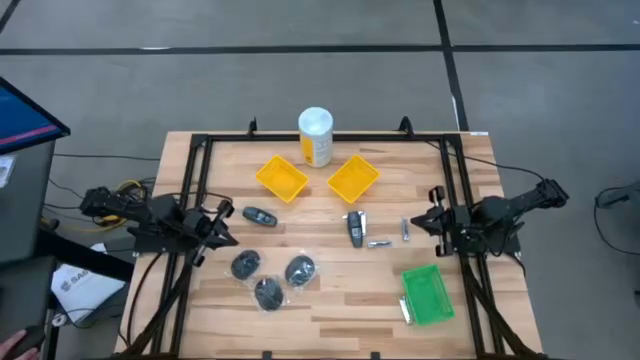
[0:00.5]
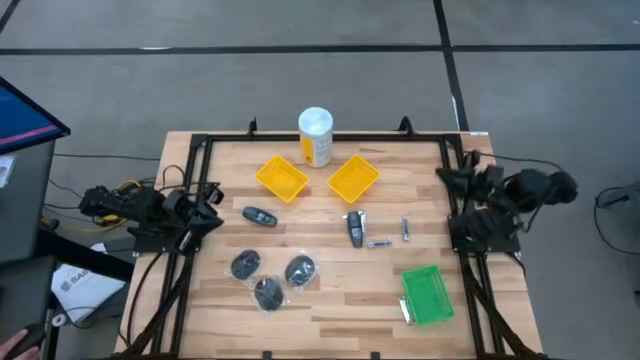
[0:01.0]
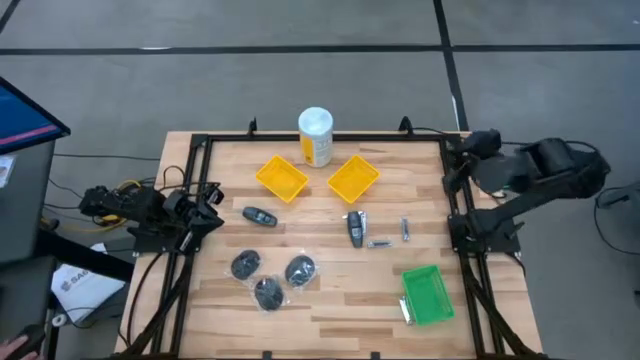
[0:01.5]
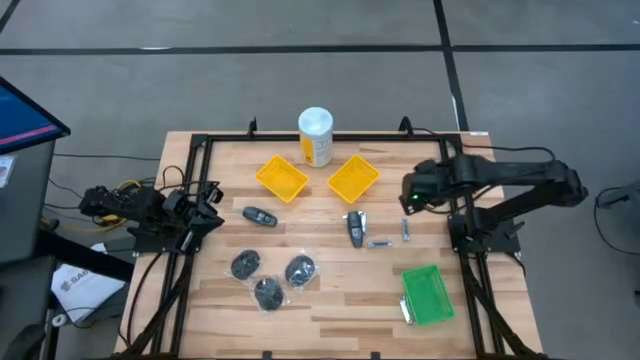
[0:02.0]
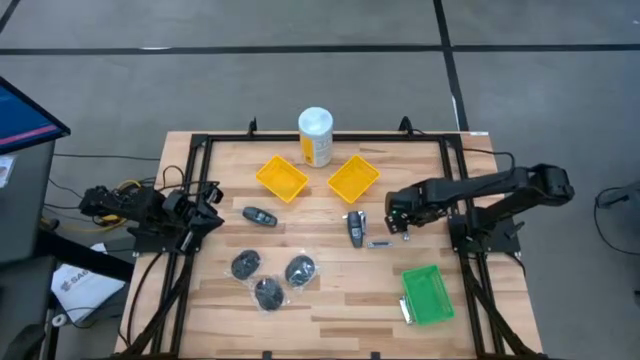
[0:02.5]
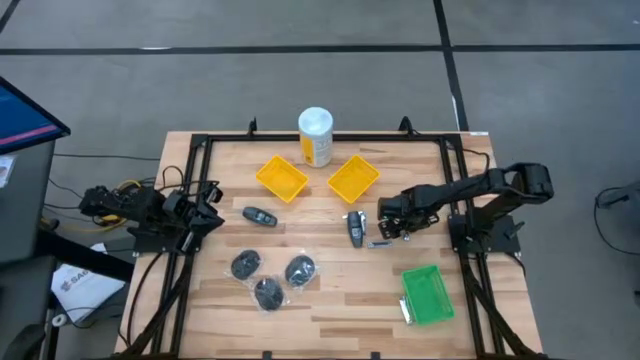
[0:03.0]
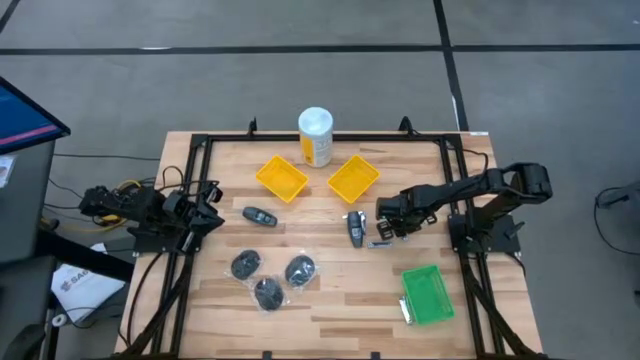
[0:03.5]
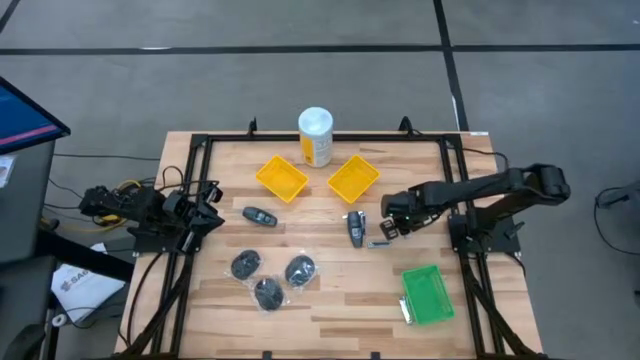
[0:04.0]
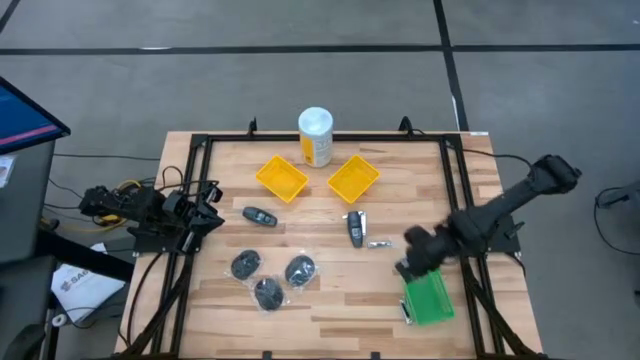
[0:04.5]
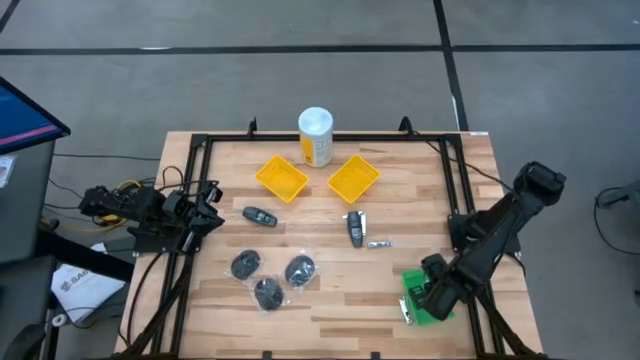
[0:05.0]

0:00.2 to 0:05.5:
Task: Pick & Place Travel size toiletries
Put the nail cutter into the green bin

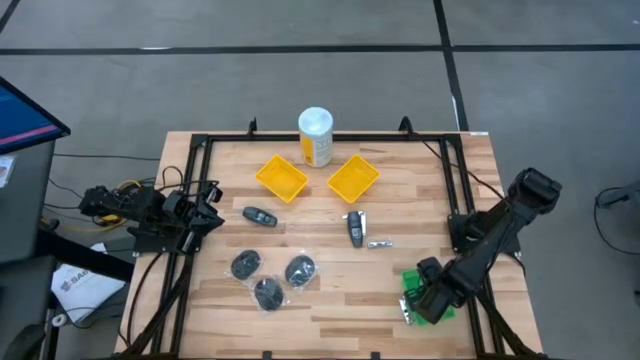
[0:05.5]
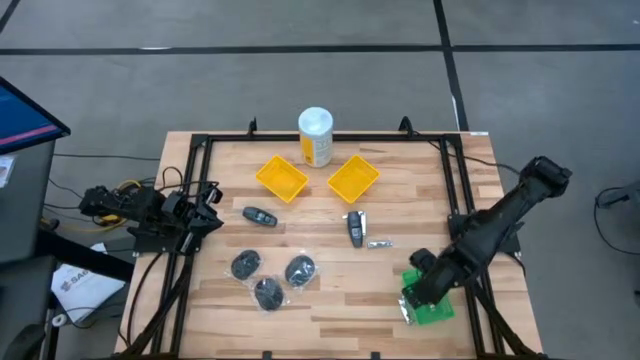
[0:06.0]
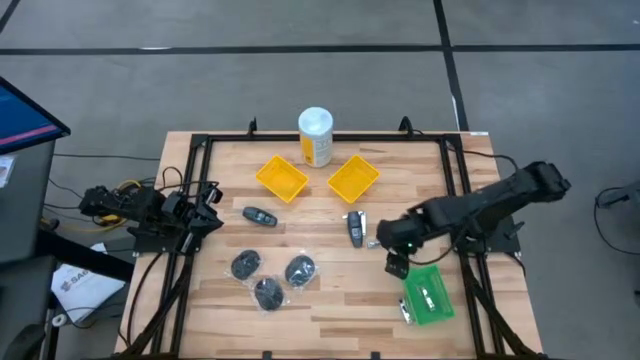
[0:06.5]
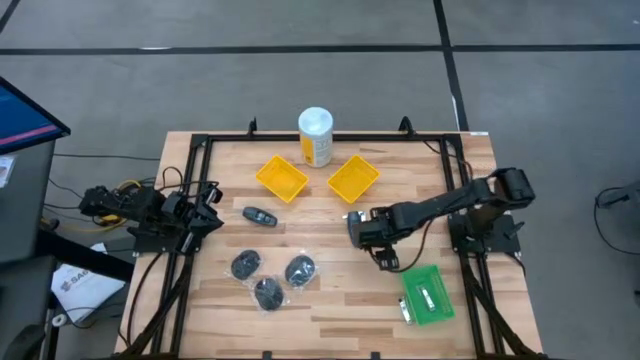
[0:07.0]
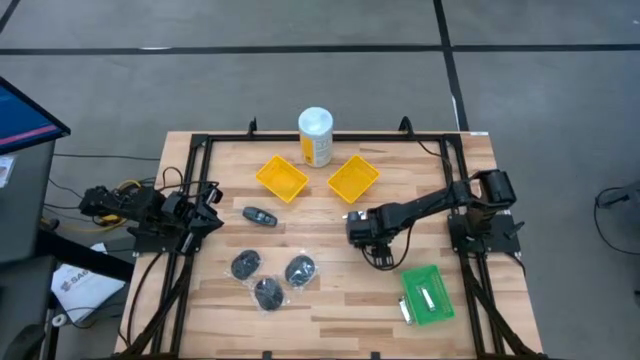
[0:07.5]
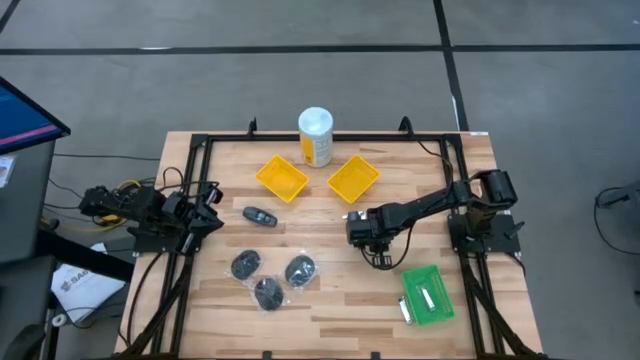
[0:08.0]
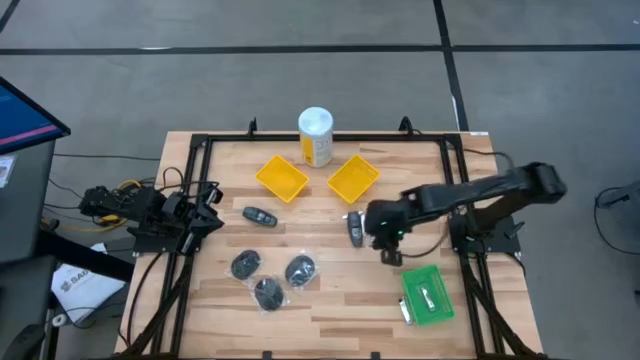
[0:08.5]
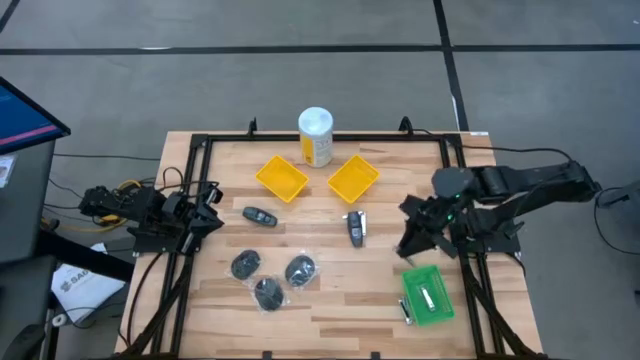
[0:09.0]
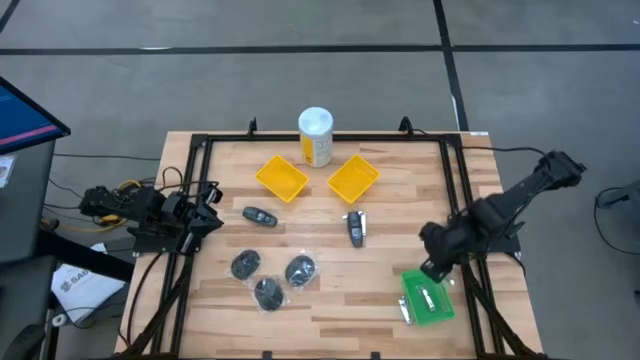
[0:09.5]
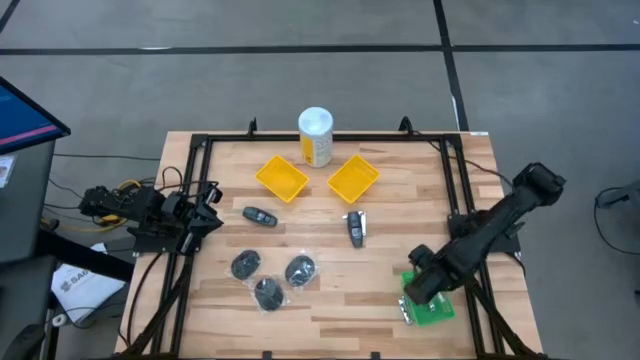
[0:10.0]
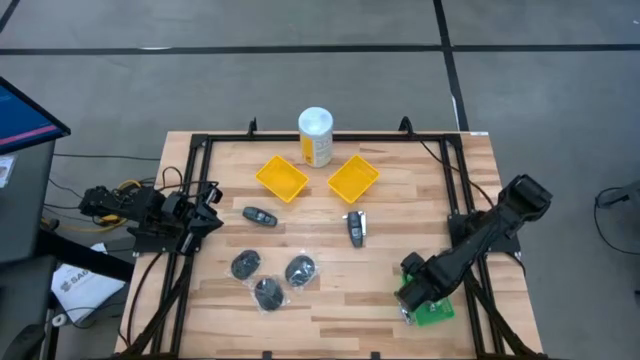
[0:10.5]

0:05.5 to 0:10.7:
Put the nail cutter into the green bin

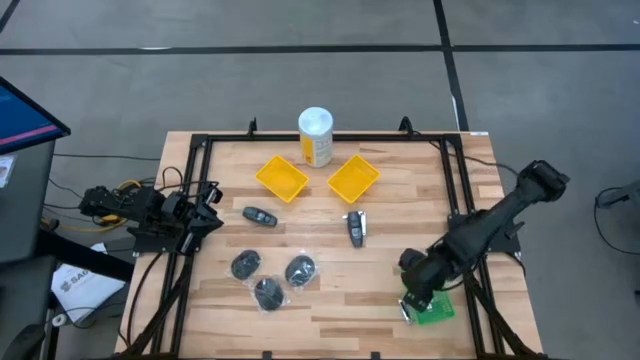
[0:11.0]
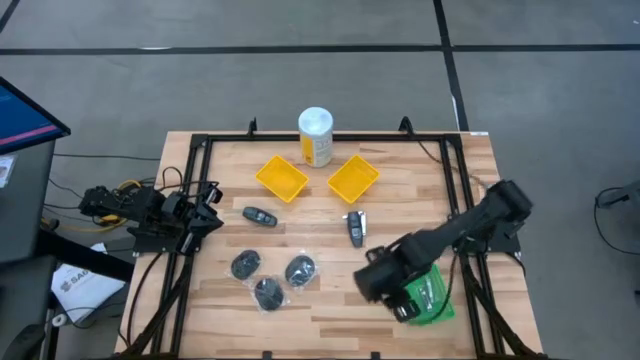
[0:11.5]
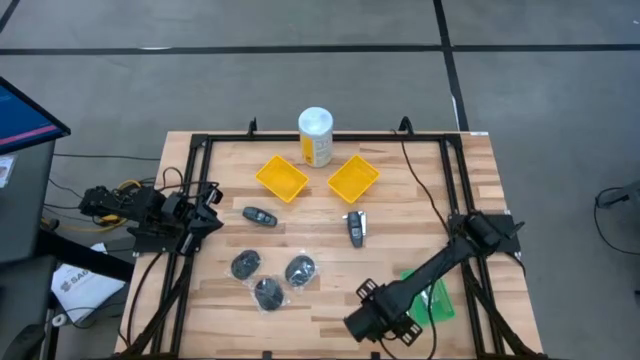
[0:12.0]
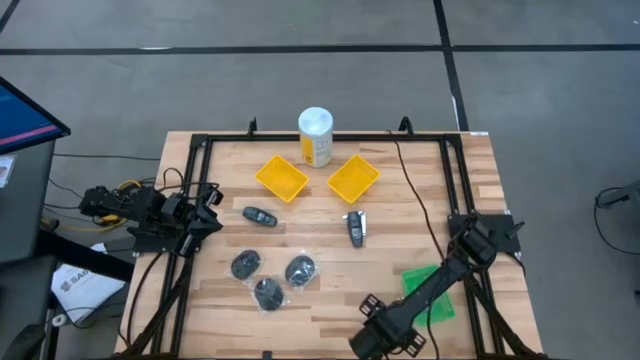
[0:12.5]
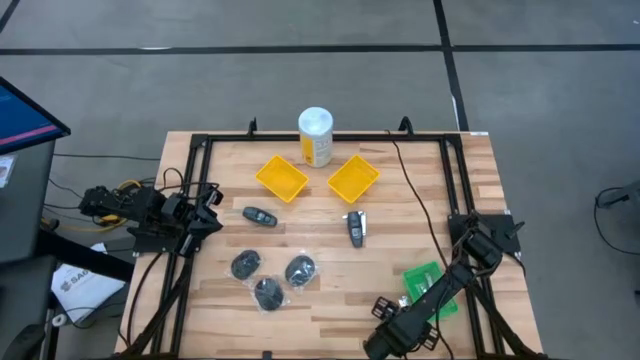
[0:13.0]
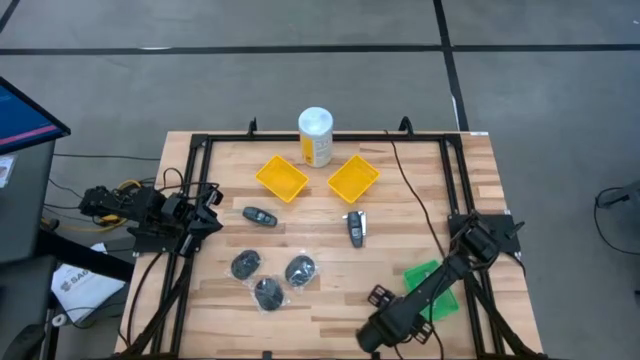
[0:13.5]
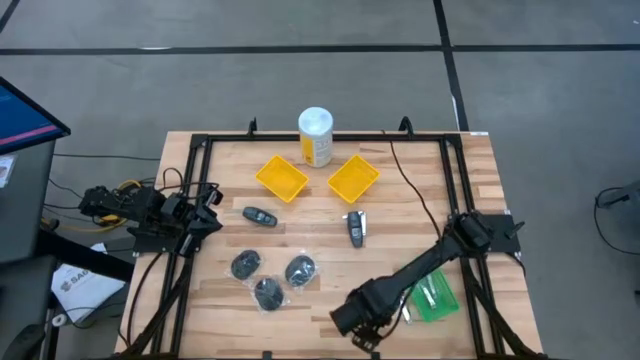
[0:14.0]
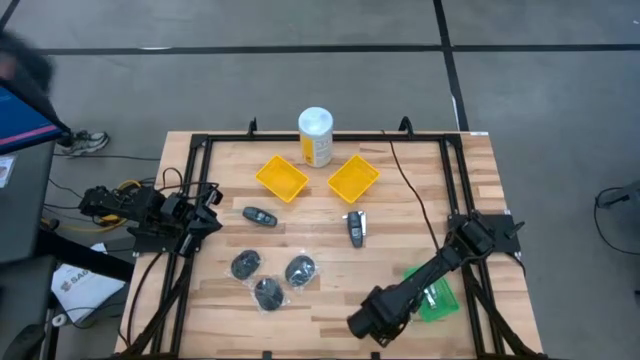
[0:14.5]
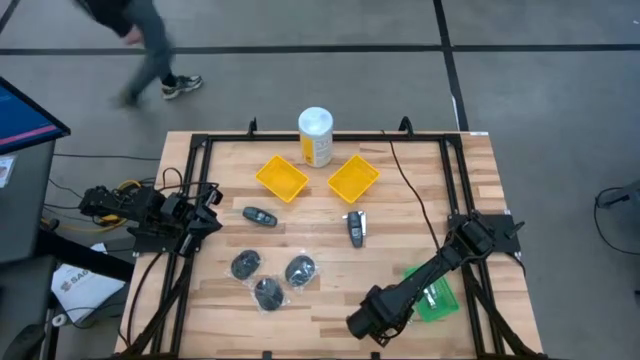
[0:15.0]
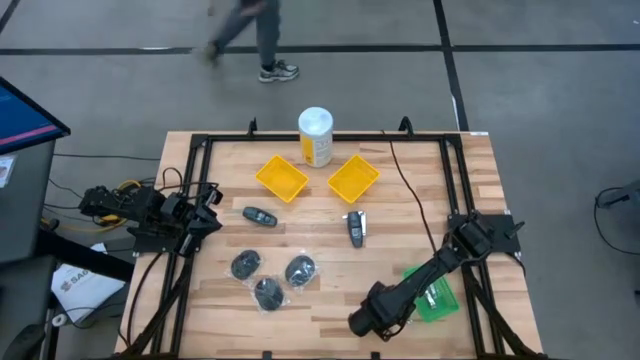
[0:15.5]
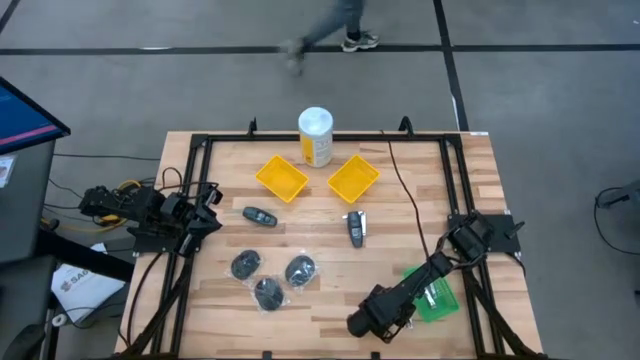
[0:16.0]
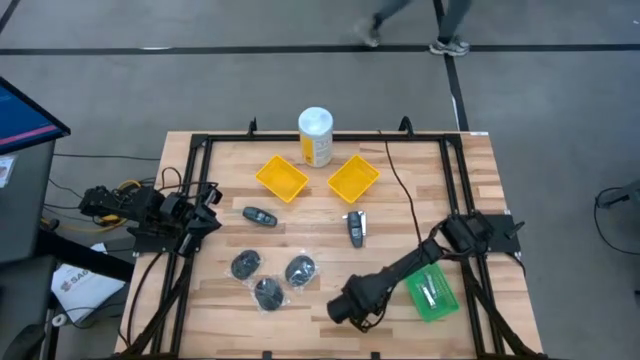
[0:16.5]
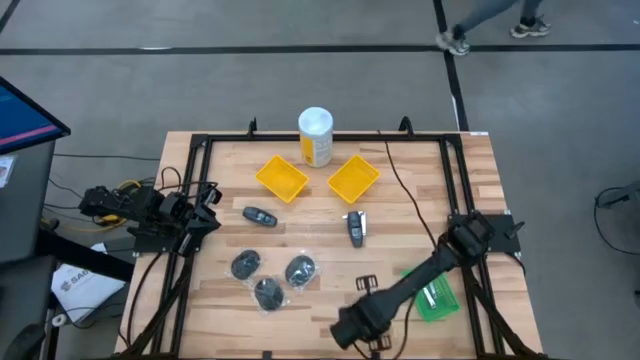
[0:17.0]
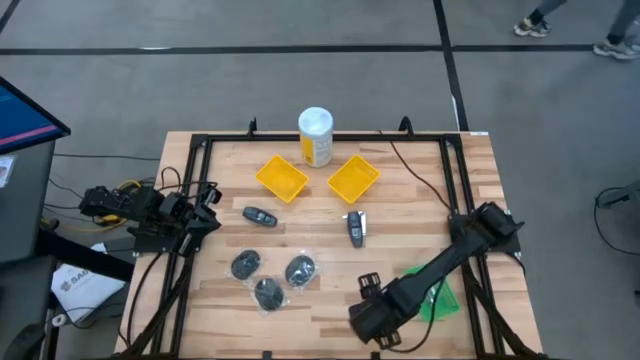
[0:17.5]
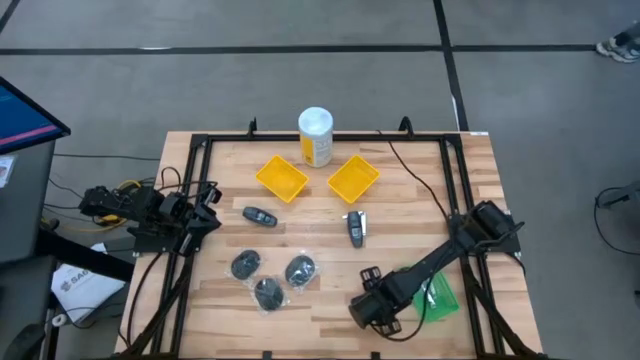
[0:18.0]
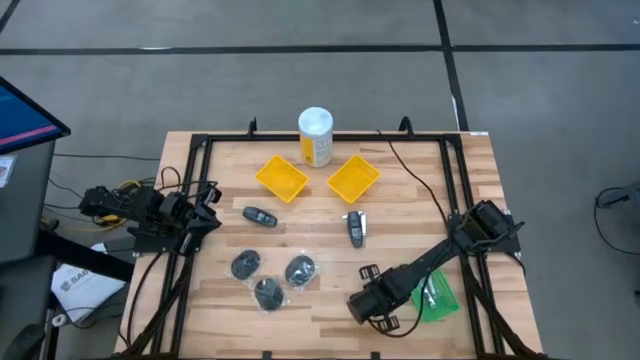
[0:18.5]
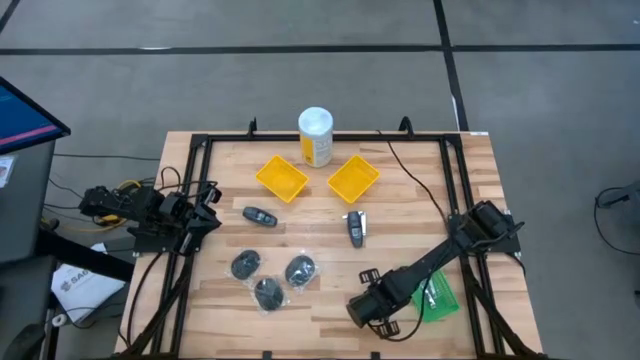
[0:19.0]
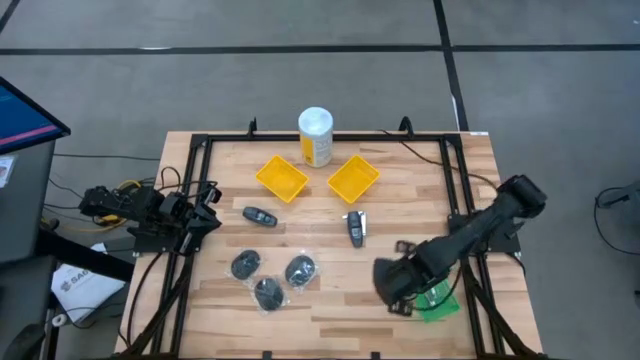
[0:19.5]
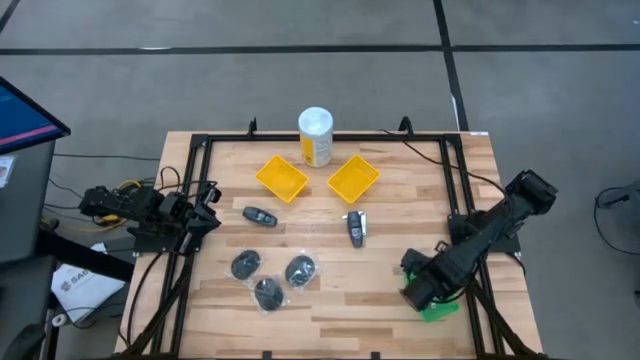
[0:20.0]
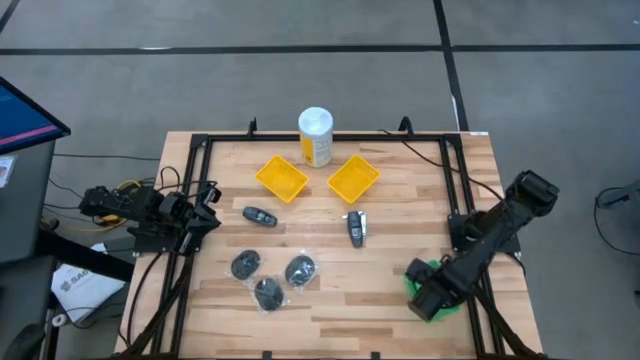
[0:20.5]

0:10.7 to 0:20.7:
Put the nail cutter into the green bin

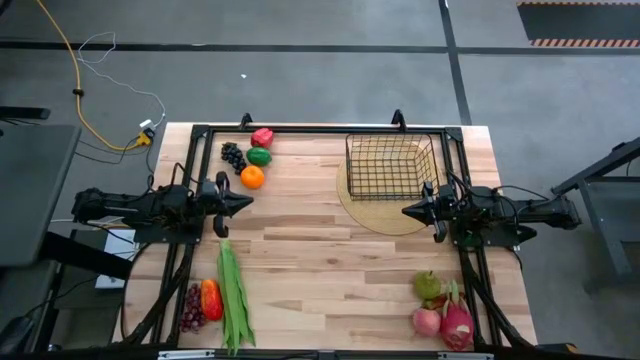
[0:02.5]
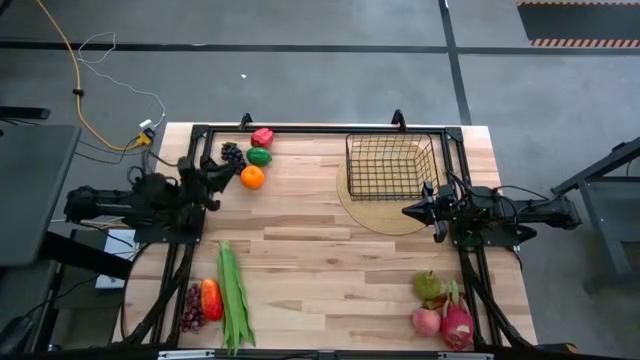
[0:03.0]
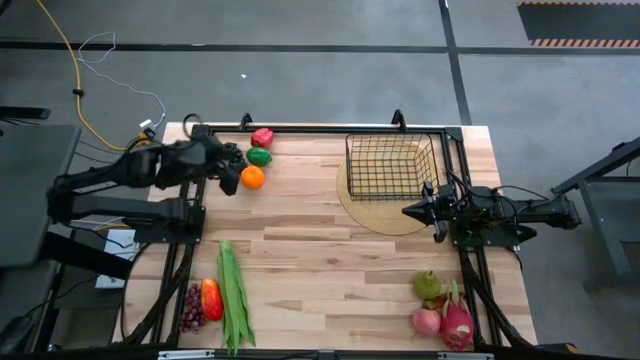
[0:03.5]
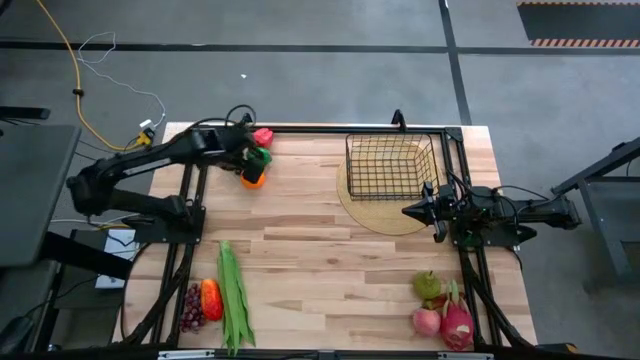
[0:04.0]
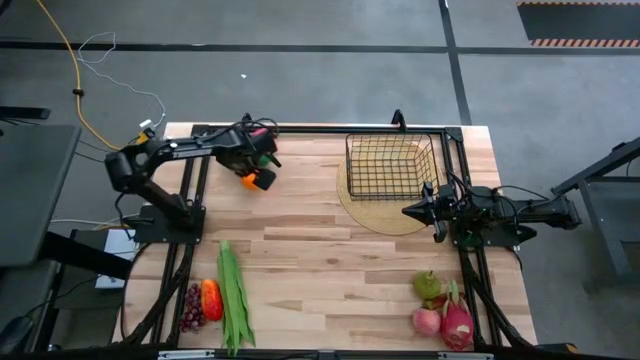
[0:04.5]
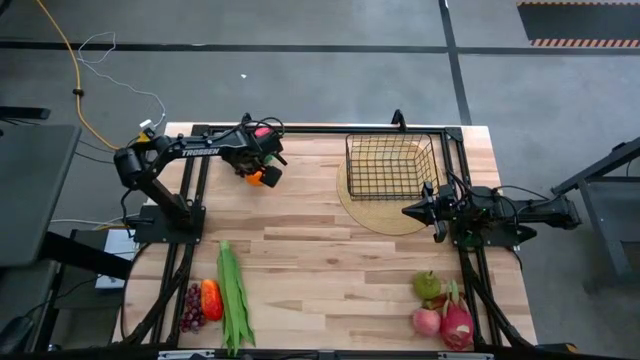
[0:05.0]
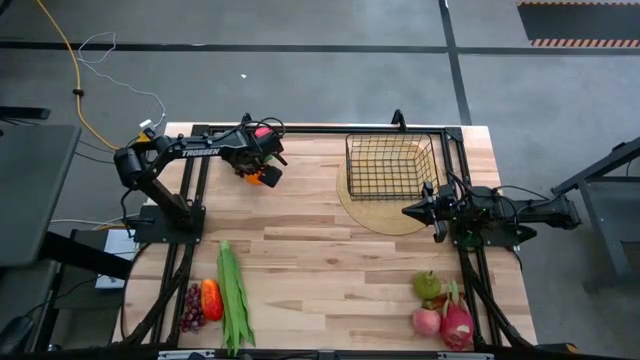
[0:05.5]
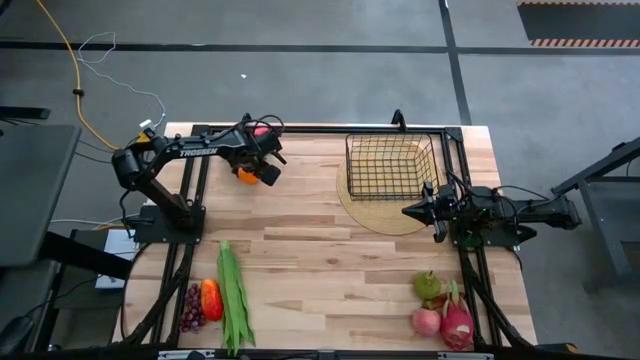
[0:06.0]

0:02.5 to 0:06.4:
Task: Build produce basket
Put the orange into the black wire basket
